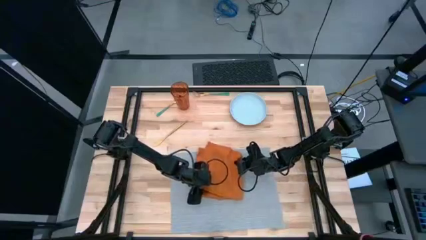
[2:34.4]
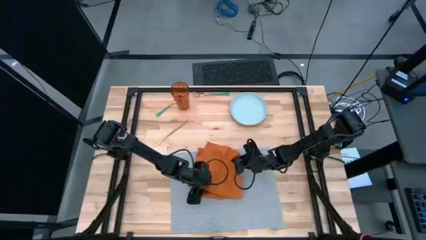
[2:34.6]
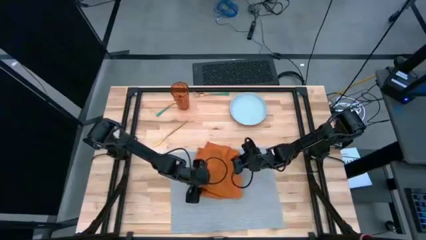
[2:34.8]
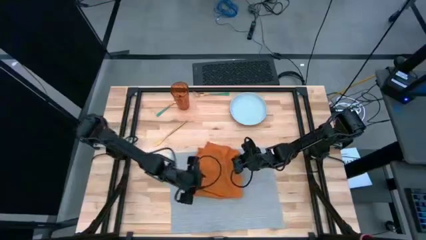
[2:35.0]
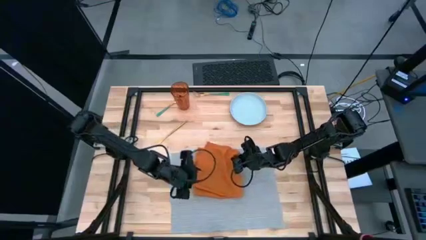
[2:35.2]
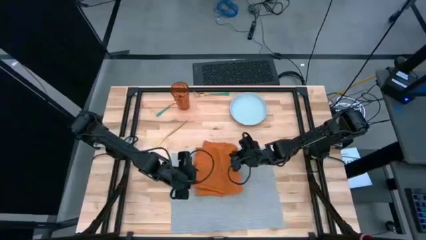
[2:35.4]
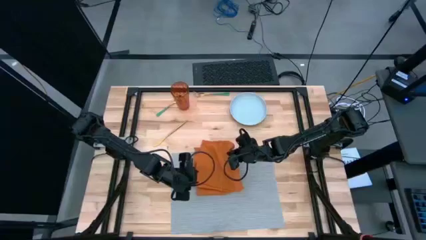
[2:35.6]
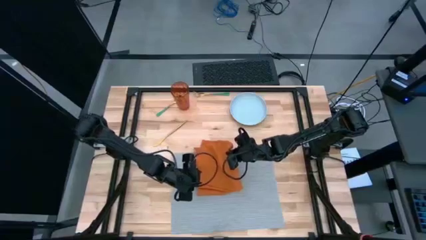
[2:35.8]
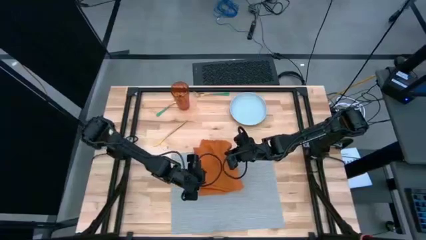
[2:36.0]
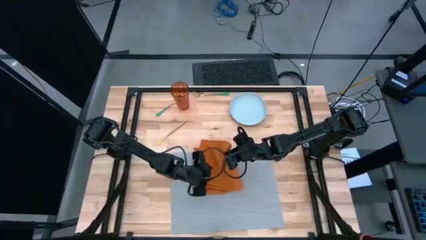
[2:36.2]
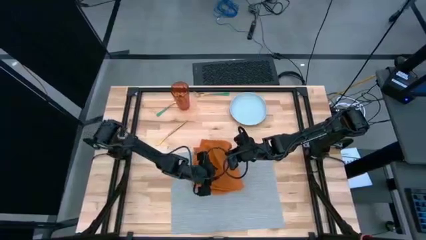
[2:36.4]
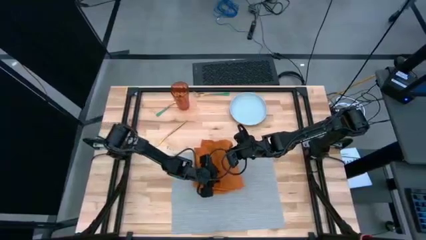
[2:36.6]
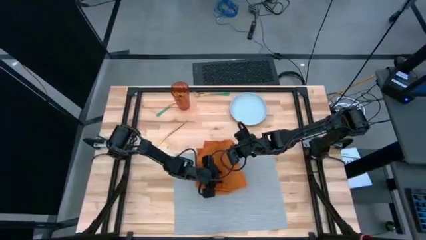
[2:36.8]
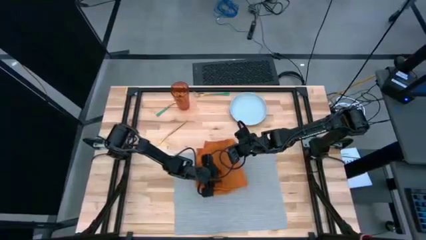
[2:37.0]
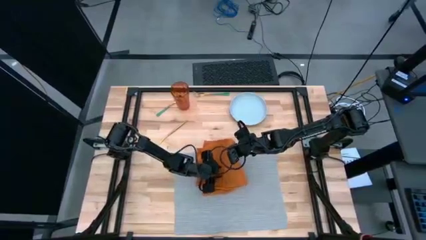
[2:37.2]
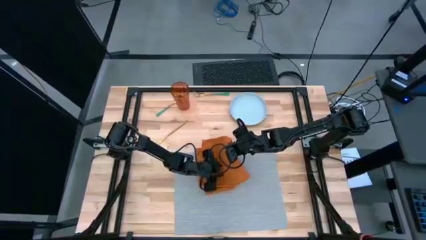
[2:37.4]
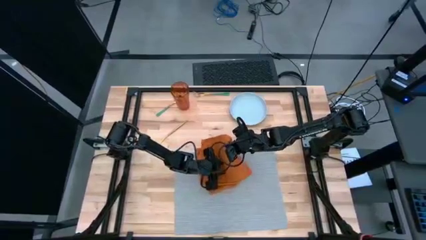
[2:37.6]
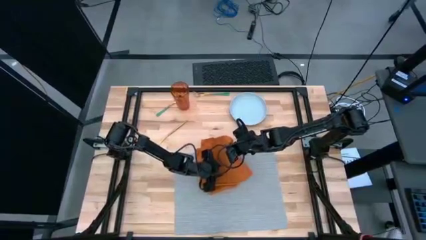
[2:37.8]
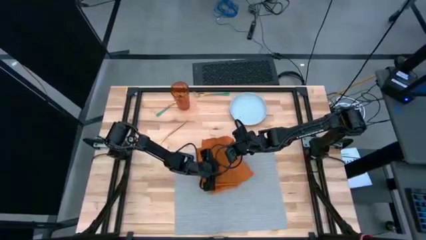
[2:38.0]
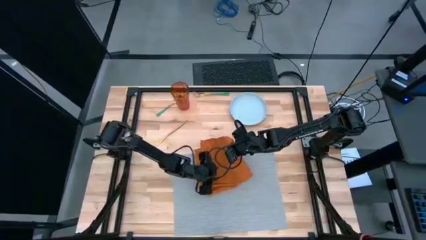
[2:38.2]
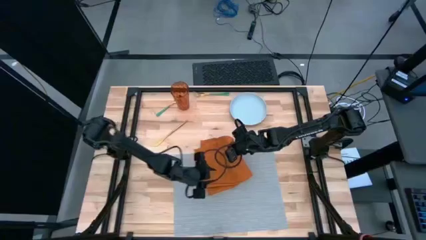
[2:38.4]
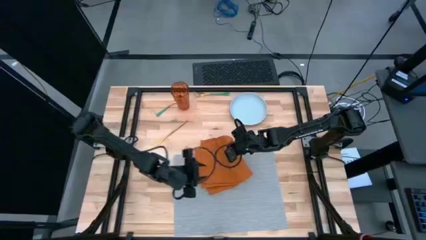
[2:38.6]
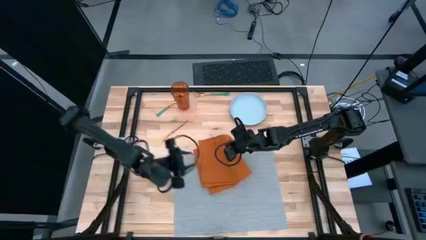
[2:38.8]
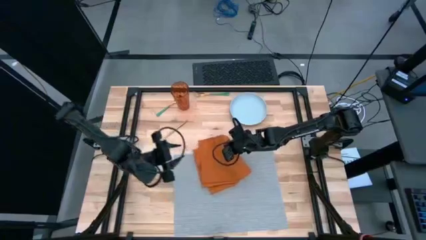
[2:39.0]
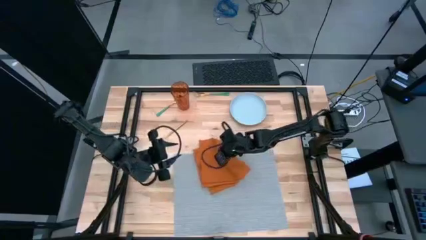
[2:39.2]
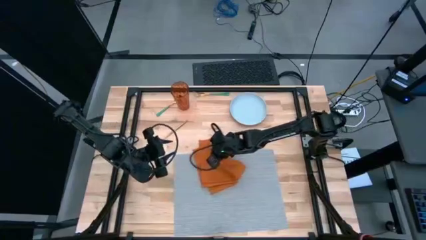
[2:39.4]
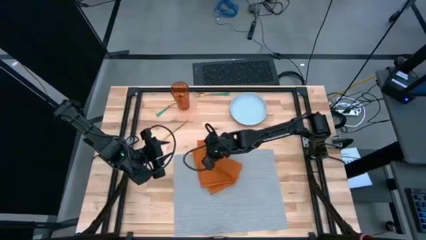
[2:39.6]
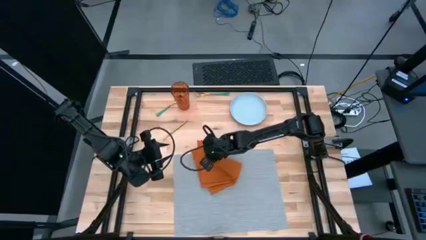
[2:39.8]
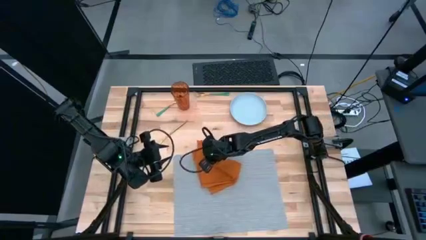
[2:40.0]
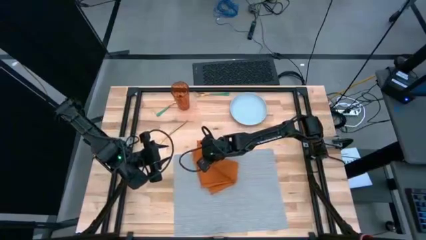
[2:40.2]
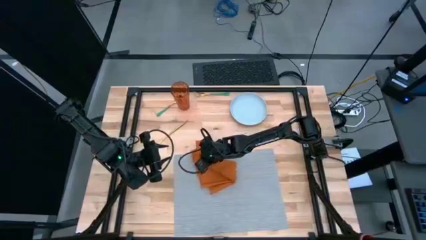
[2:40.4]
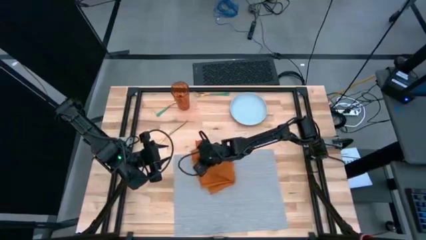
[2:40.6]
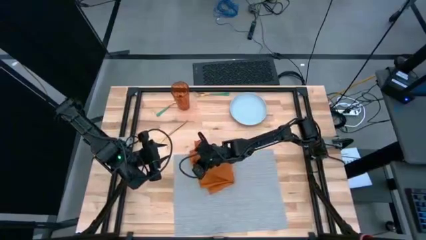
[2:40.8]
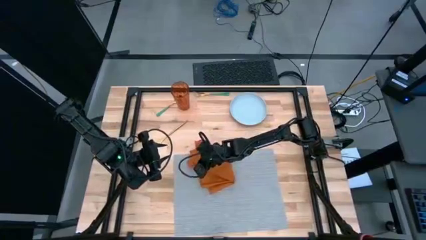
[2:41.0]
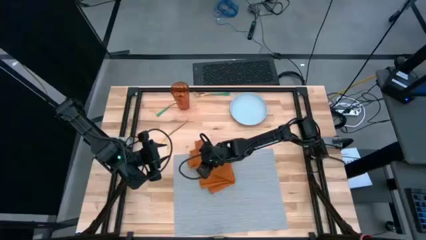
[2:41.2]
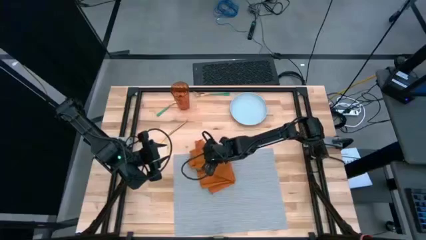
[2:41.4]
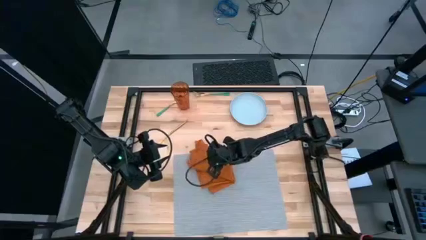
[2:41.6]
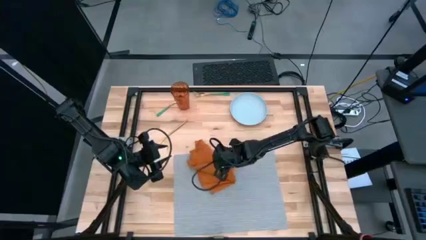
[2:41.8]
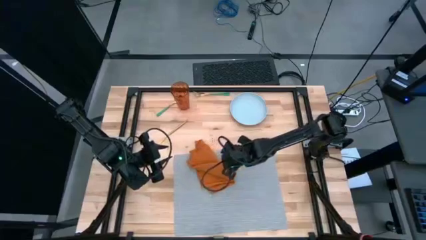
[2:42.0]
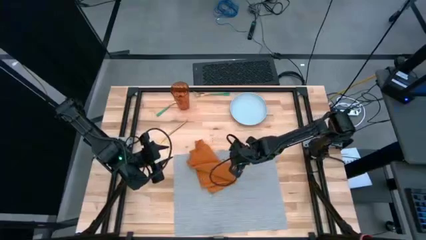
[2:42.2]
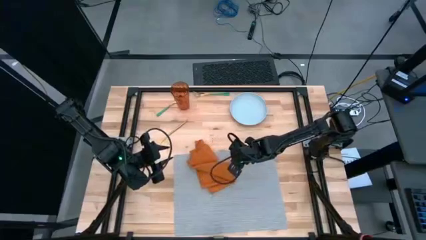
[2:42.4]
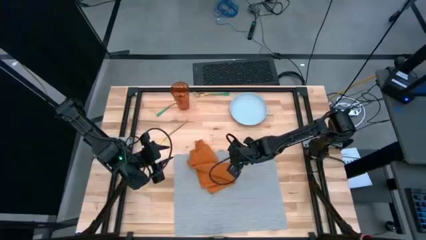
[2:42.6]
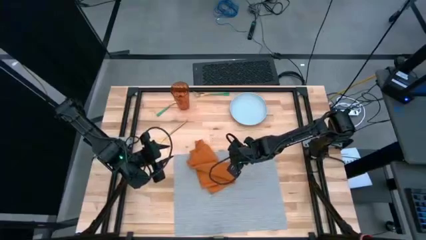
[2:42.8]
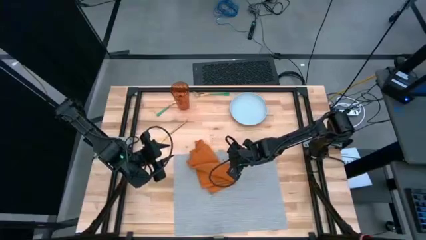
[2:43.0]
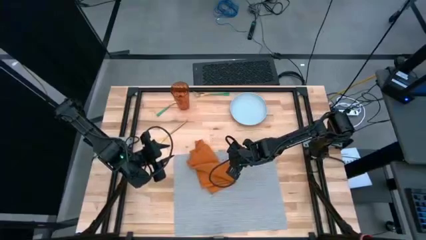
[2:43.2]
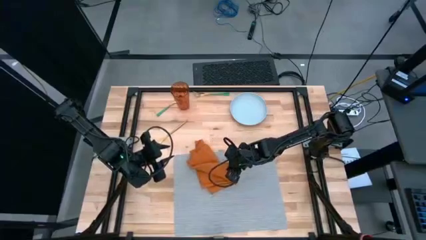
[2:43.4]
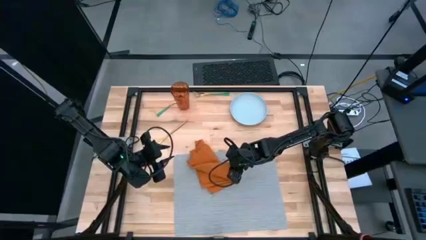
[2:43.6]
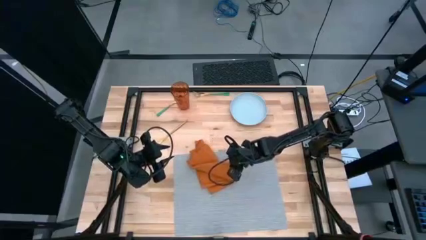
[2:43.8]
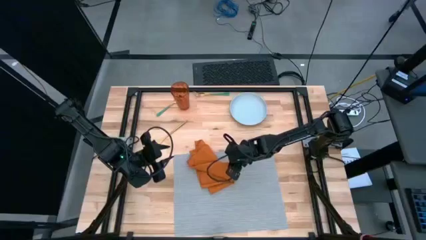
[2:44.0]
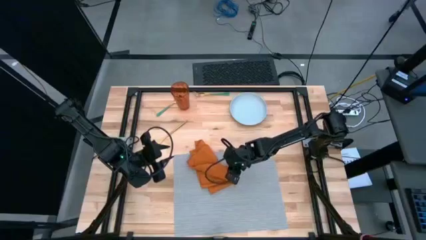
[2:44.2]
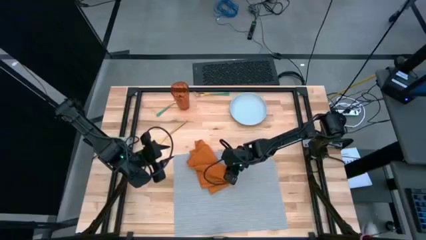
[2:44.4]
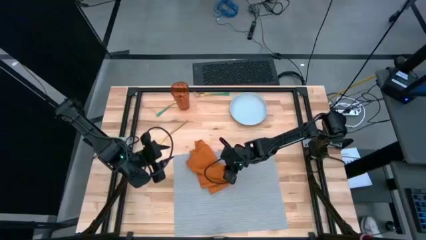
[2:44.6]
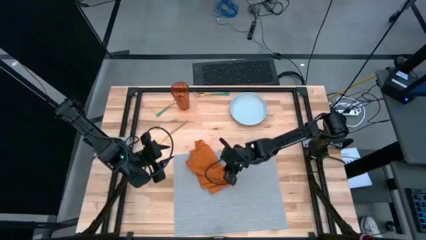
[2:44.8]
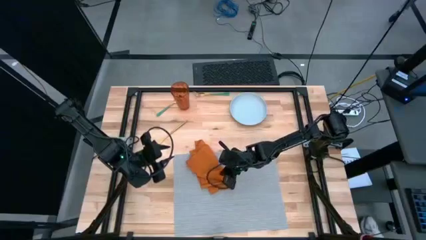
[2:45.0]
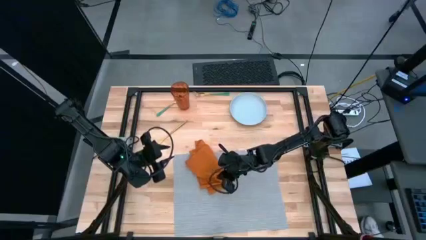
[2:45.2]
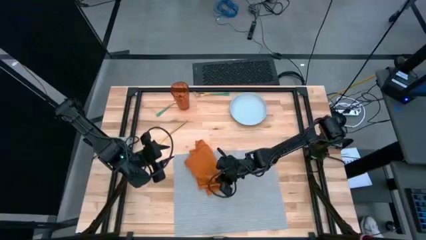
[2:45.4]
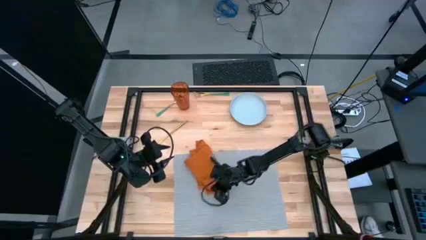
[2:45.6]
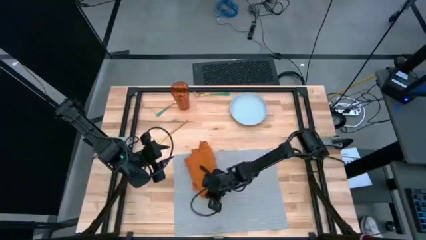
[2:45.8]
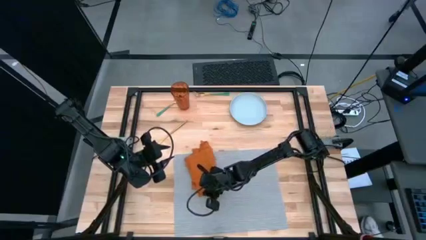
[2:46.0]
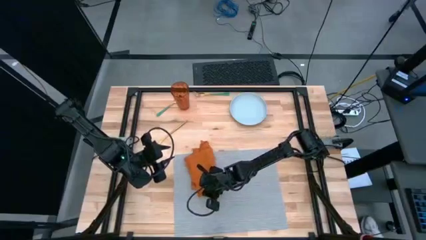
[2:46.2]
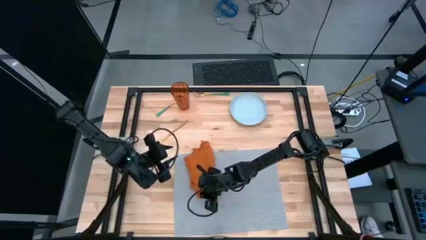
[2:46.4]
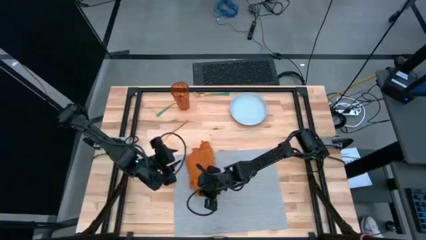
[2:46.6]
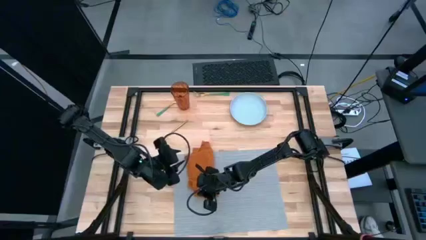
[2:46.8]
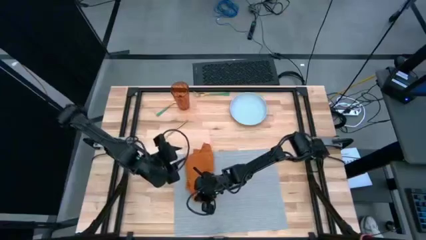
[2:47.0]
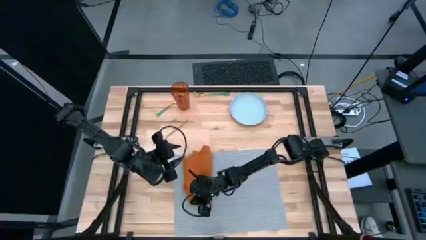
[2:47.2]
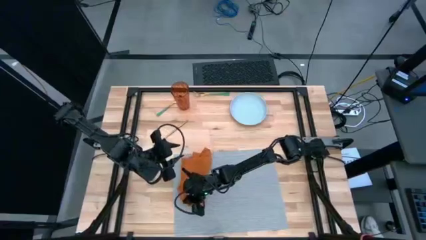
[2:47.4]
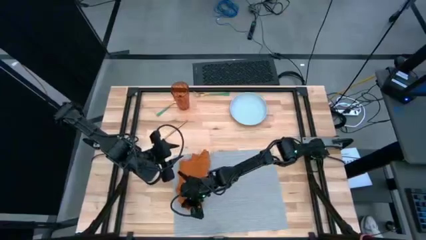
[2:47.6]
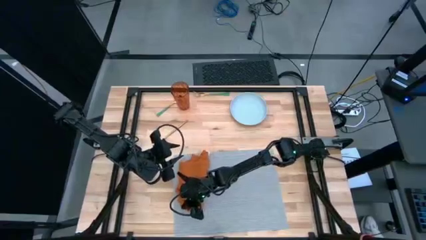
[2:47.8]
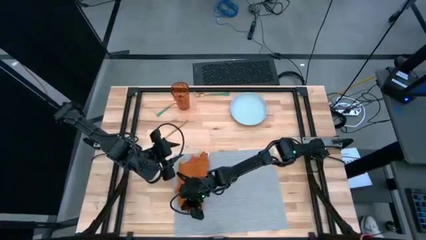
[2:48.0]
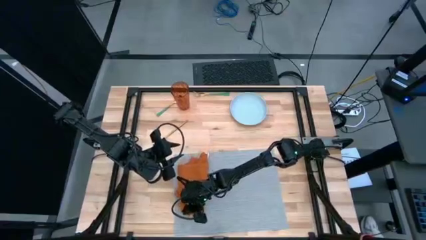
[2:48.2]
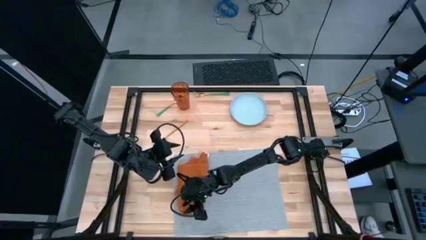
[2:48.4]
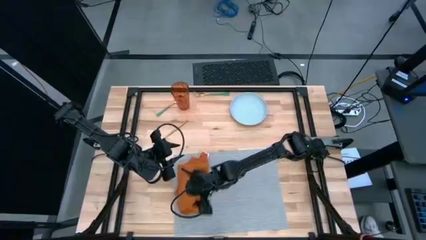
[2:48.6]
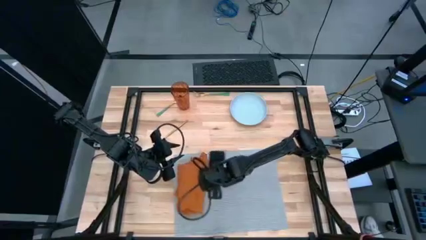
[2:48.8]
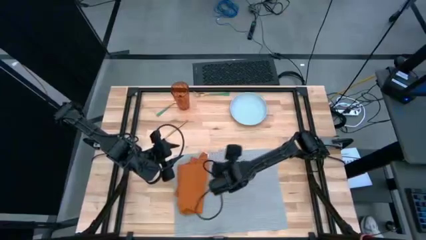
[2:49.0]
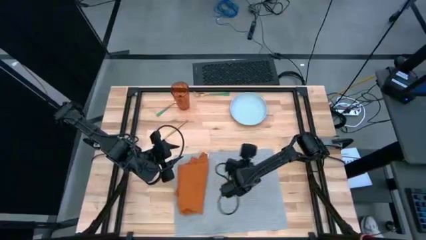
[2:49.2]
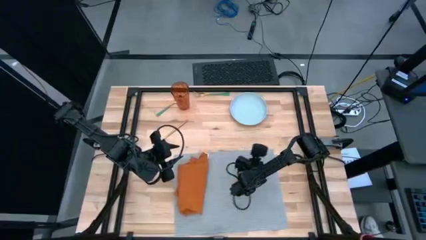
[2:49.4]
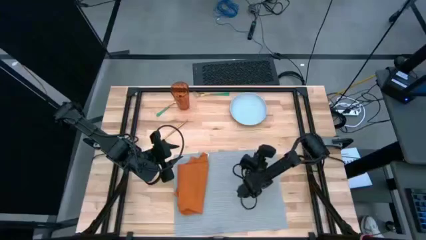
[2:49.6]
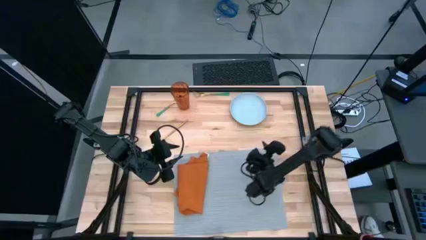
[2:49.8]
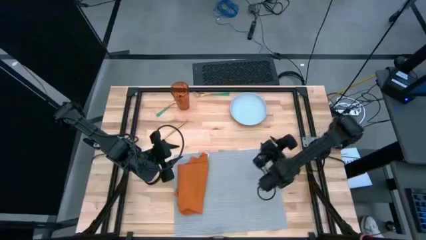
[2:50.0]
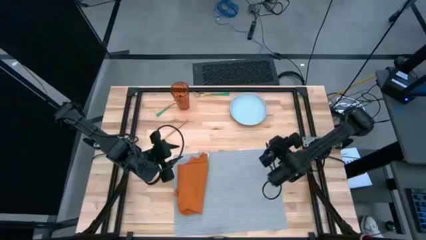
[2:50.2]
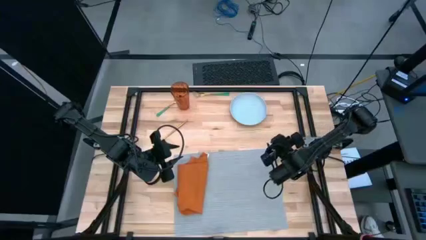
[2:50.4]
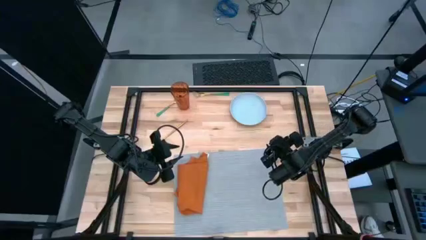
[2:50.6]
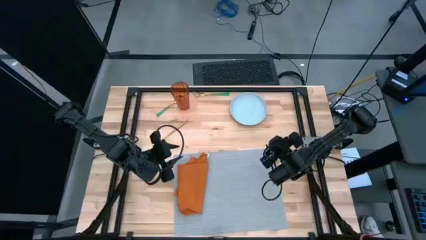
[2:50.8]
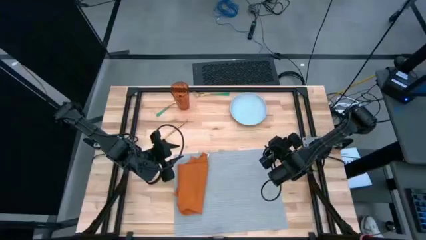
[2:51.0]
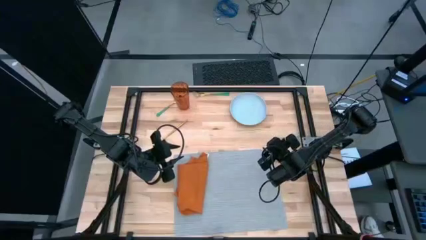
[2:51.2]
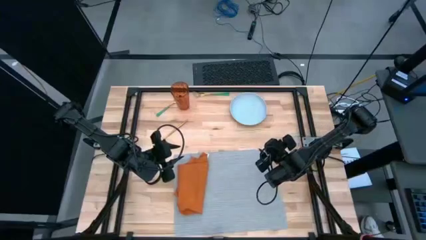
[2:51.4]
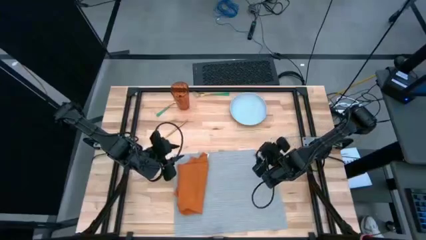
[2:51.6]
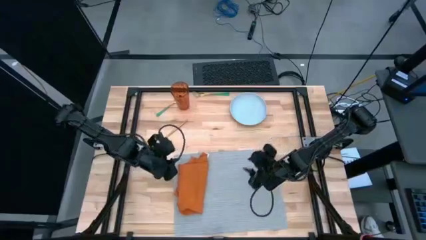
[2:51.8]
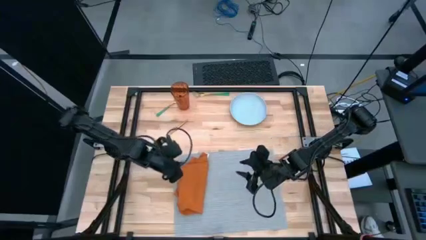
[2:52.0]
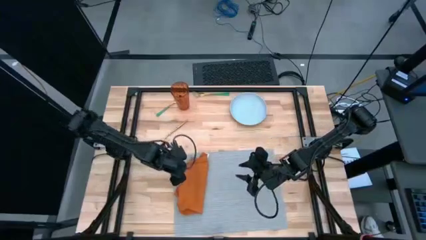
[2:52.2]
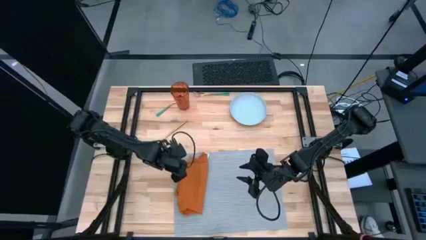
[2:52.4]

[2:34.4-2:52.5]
Task: Set table place
Fold the orange table napkin
